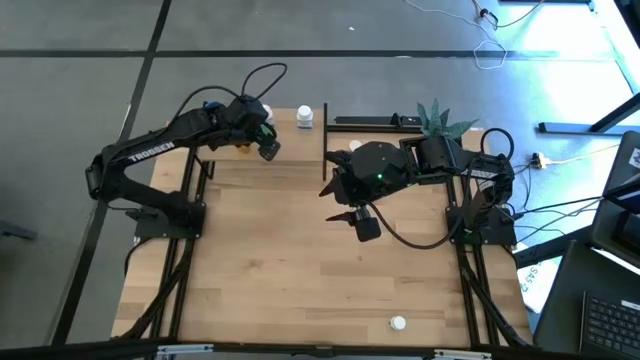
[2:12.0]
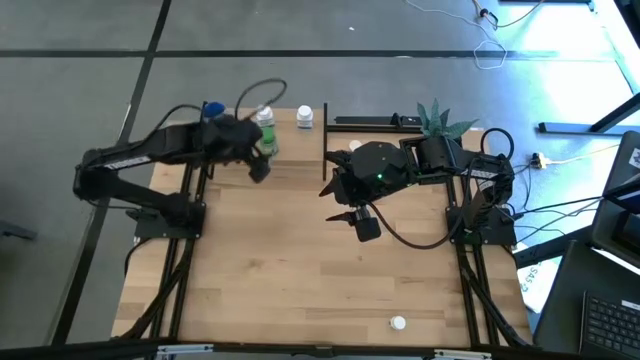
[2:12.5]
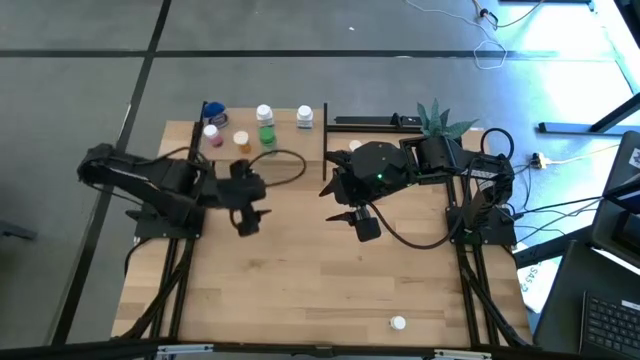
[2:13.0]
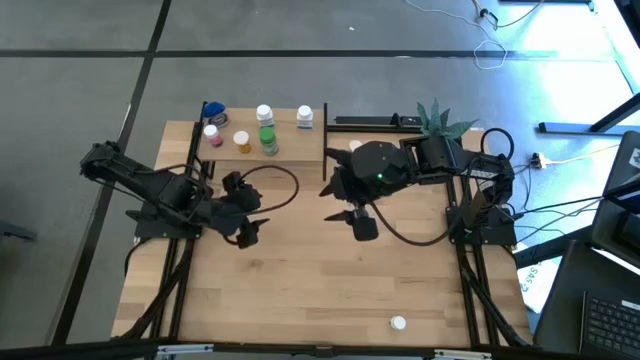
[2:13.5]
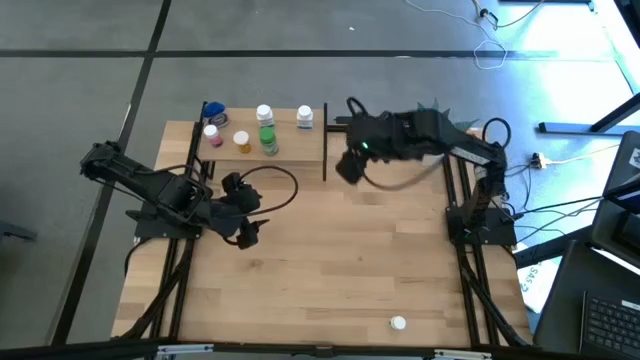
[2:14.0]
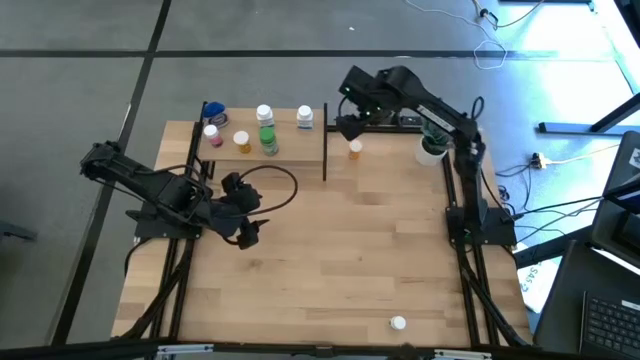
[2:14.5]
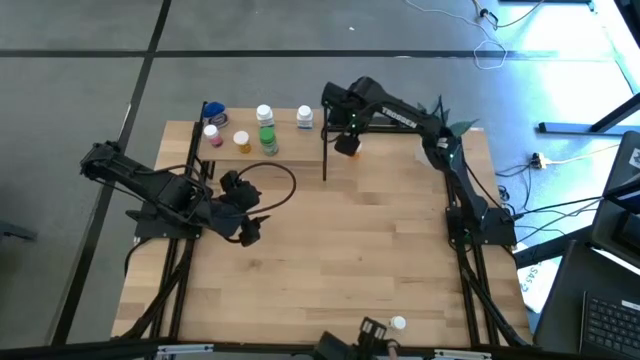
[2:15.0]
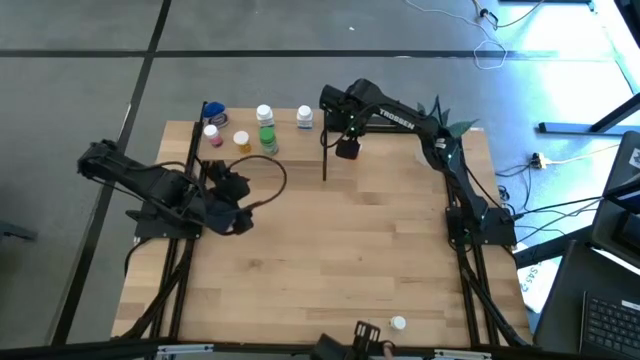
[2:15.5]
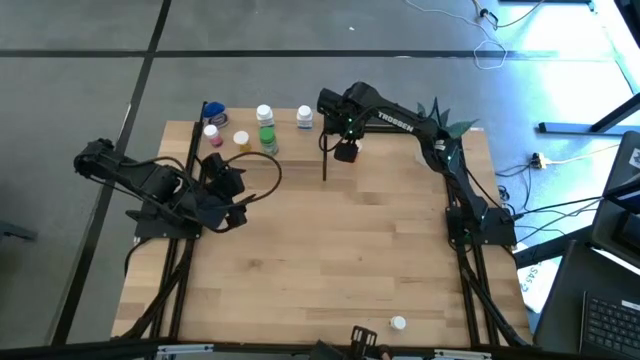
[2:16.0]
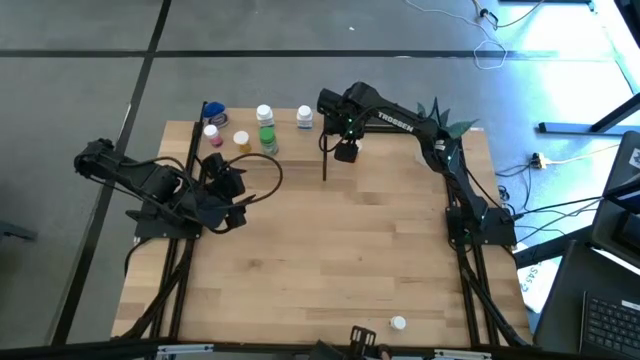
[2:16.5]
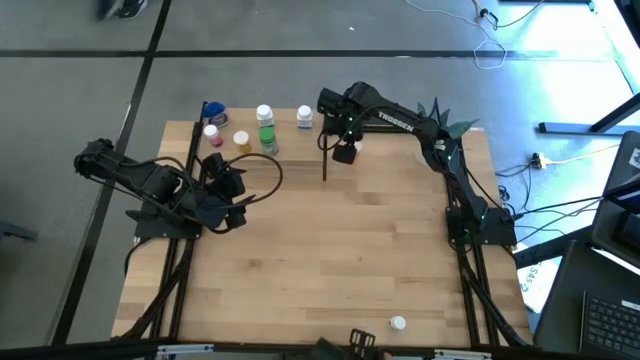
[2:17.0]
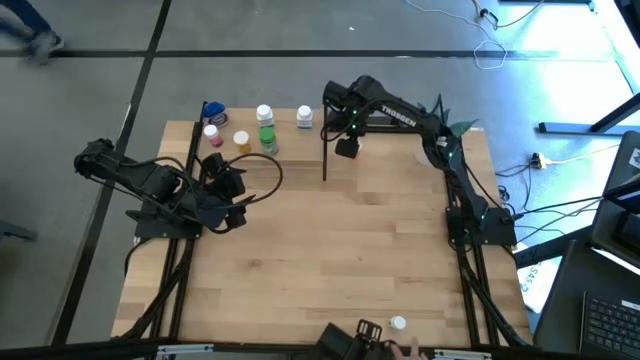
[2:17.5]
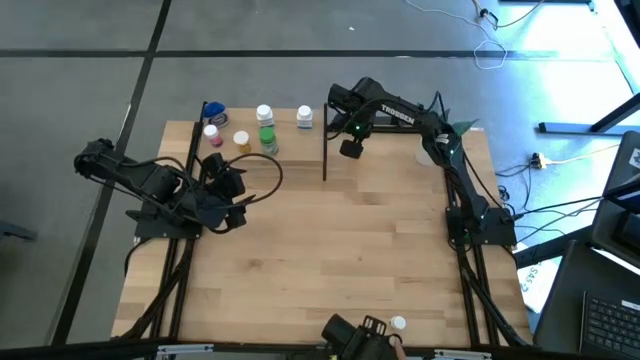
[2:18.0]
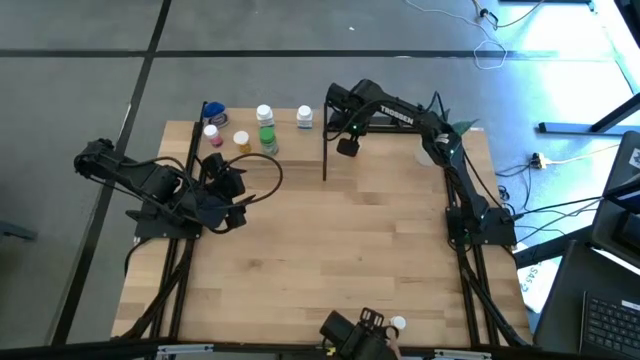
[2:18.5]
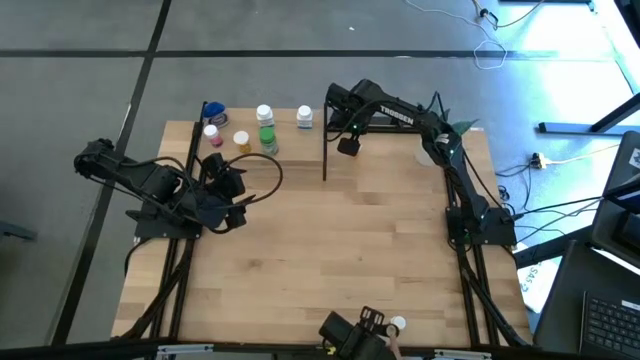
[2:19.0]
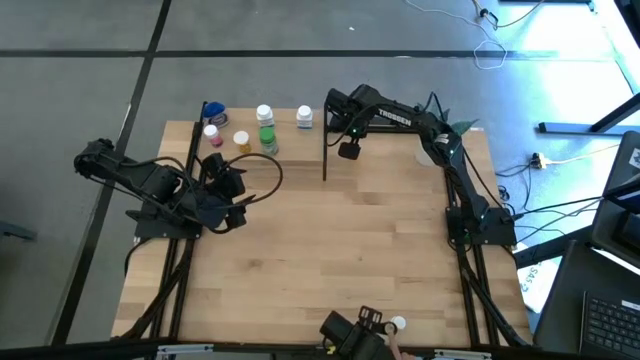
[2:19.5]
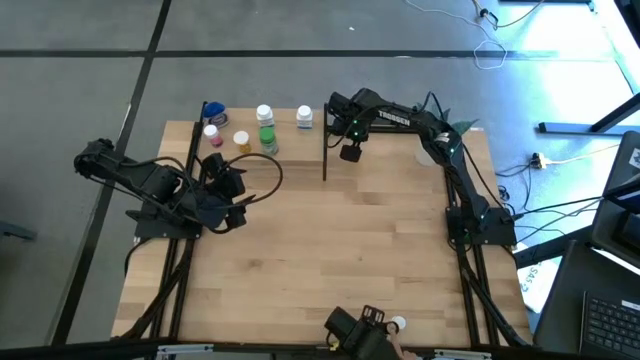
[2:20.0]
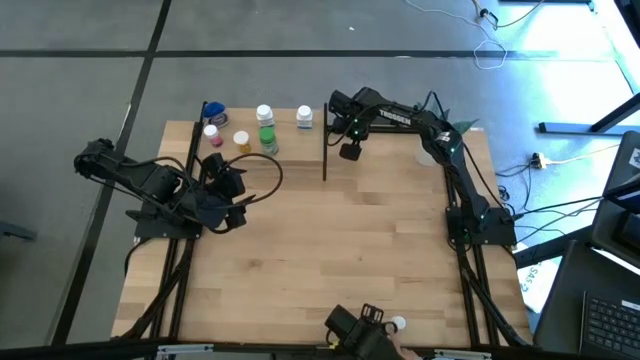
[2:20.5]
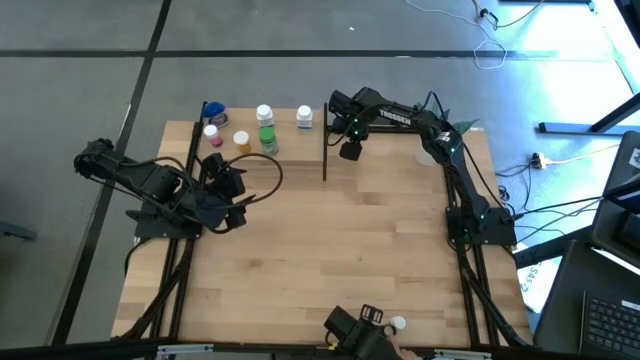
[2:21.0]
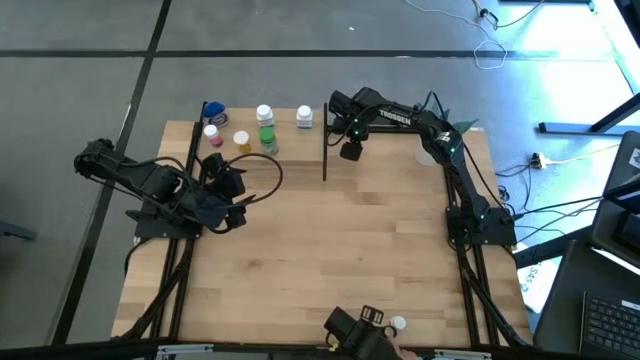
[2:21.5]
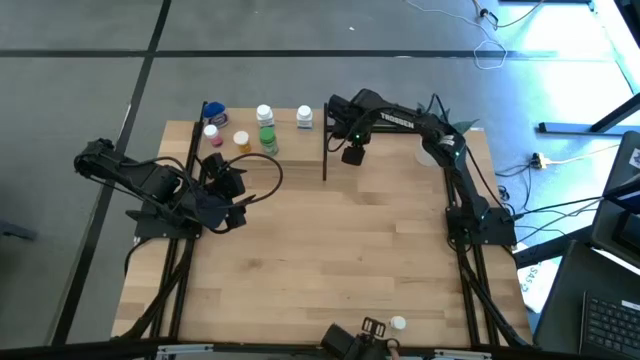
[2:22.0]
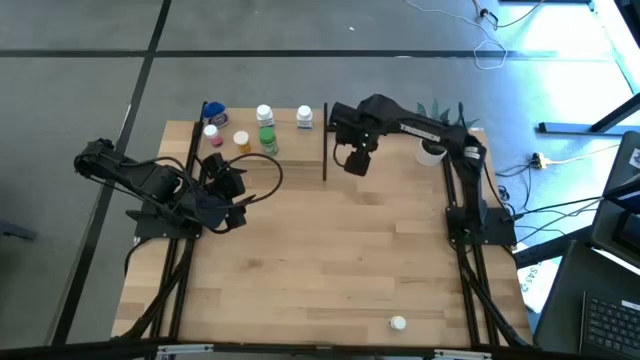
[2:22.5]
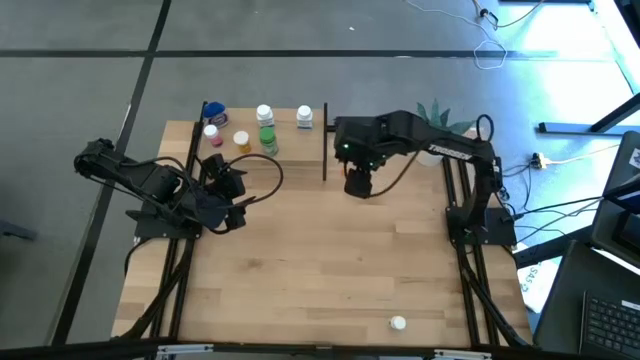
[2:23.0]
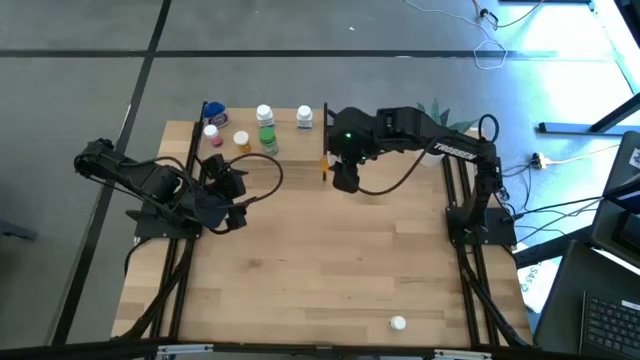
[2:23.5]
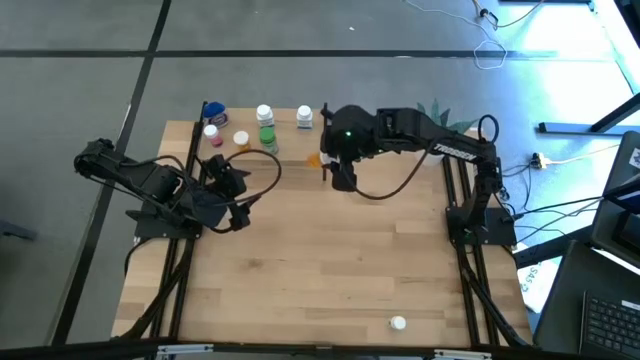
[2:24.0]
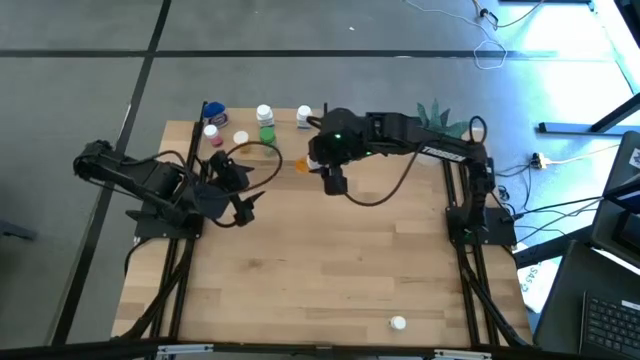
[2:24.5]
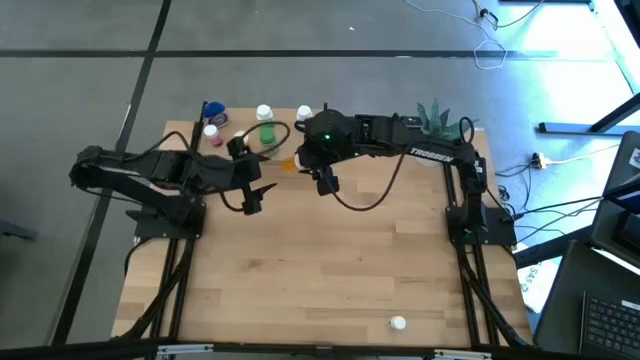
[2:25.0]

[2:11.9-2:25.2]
Task: Pick and place medicine bottles onto shelf by color
Put the orange pill bottle on the shelf

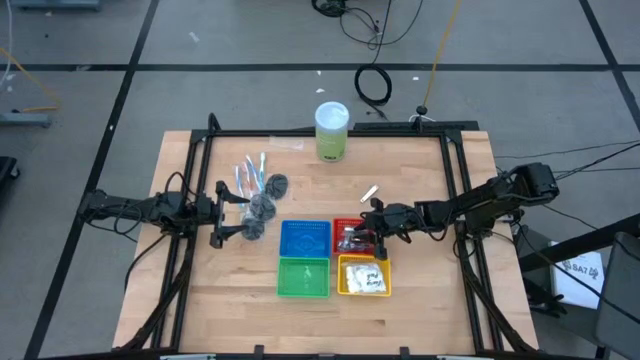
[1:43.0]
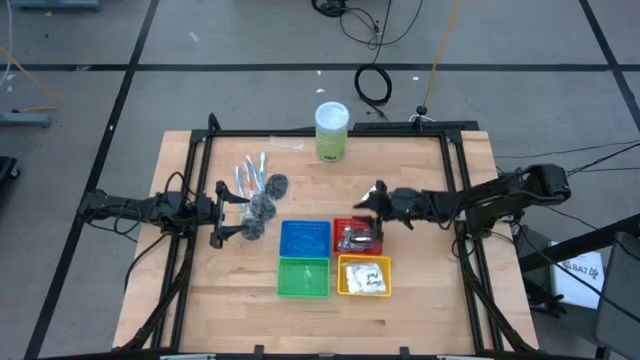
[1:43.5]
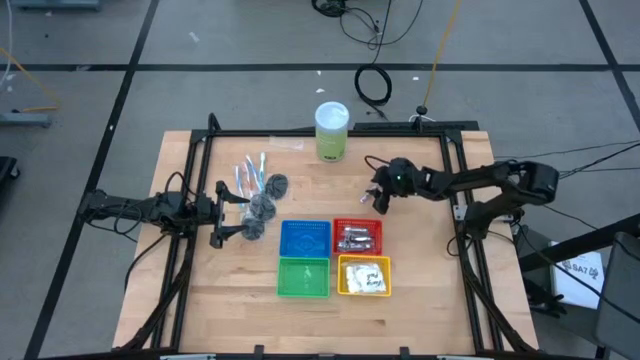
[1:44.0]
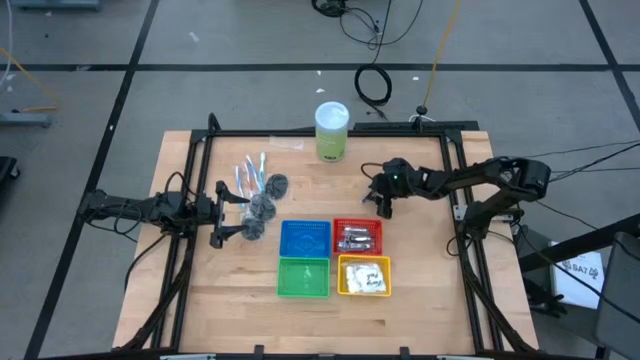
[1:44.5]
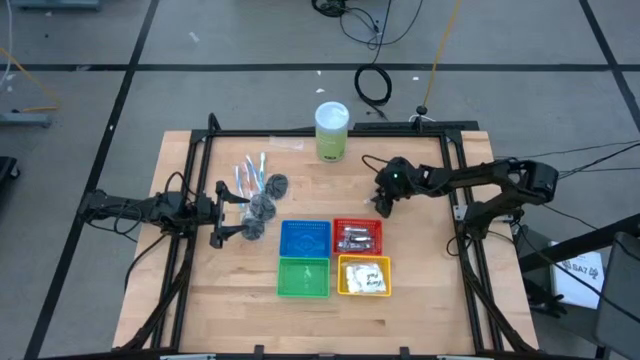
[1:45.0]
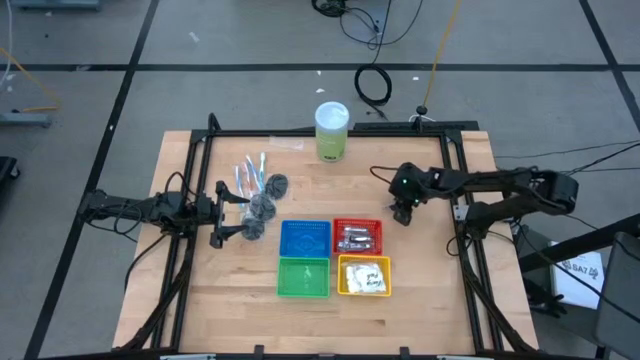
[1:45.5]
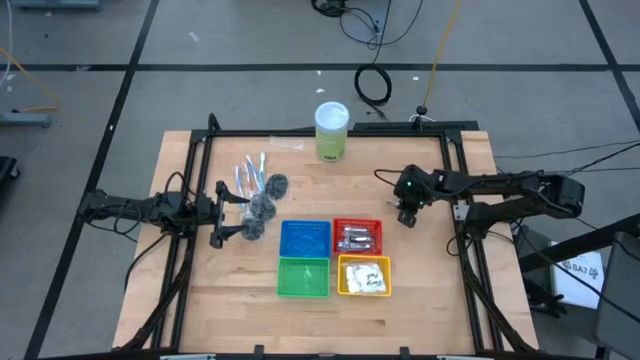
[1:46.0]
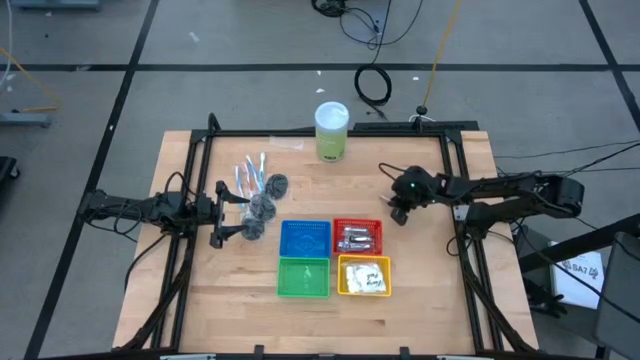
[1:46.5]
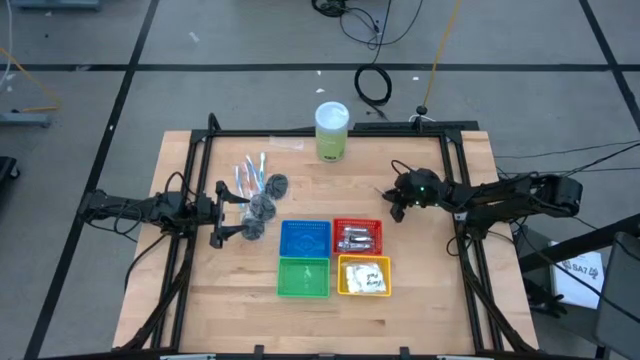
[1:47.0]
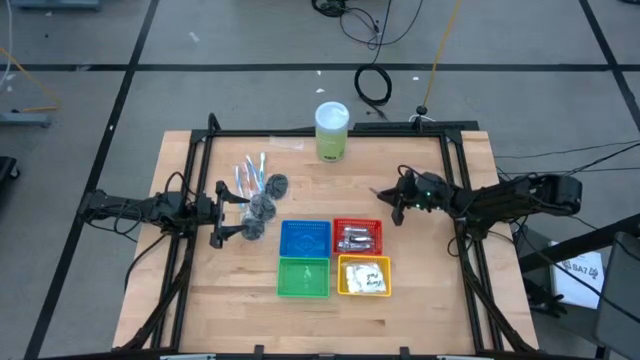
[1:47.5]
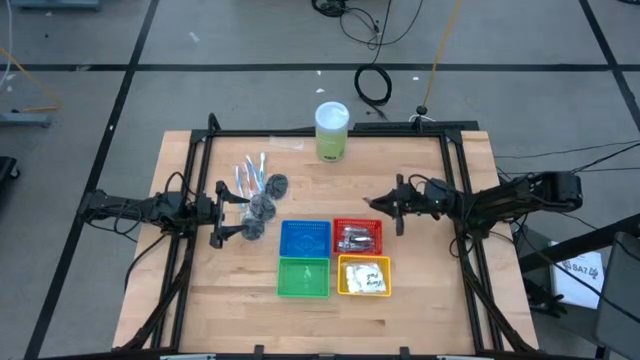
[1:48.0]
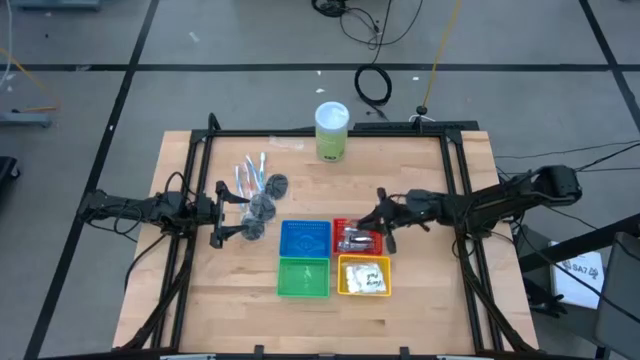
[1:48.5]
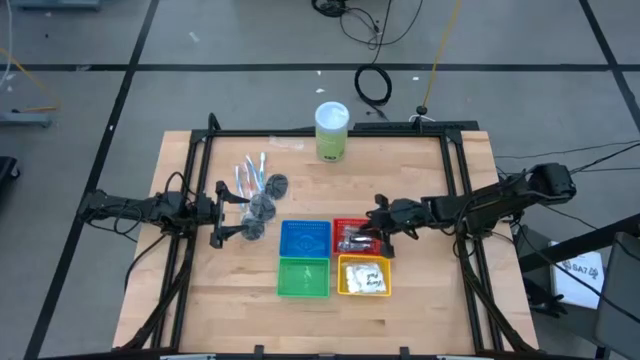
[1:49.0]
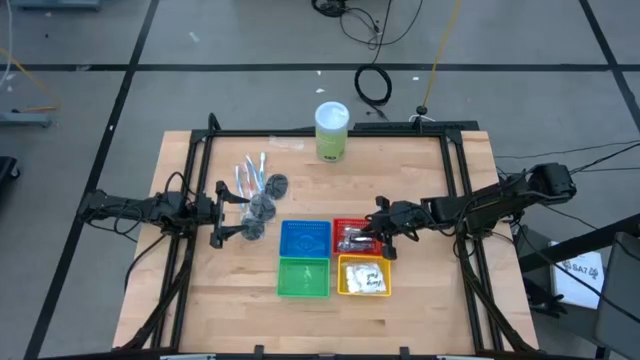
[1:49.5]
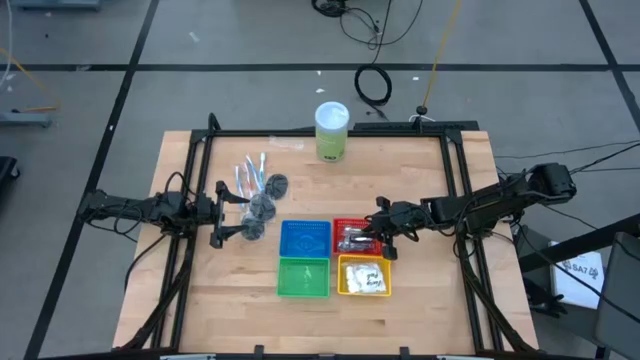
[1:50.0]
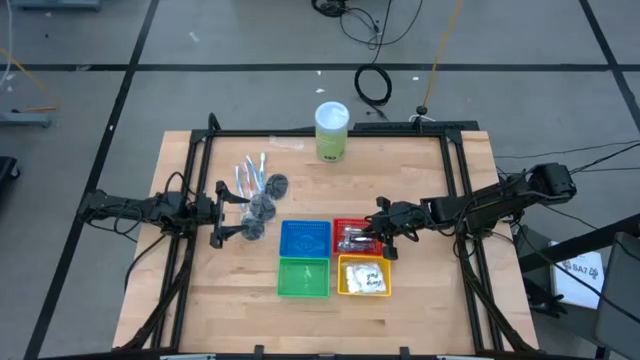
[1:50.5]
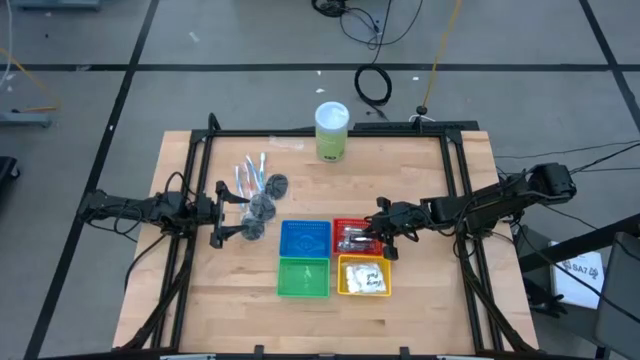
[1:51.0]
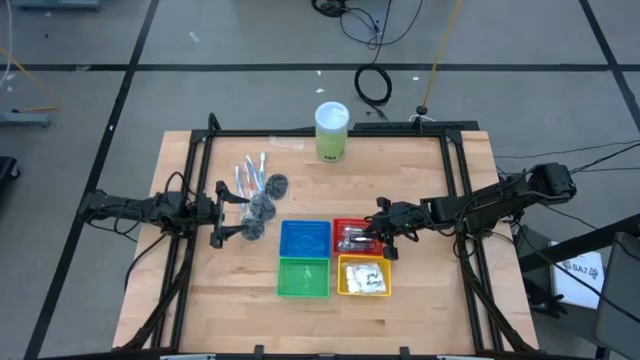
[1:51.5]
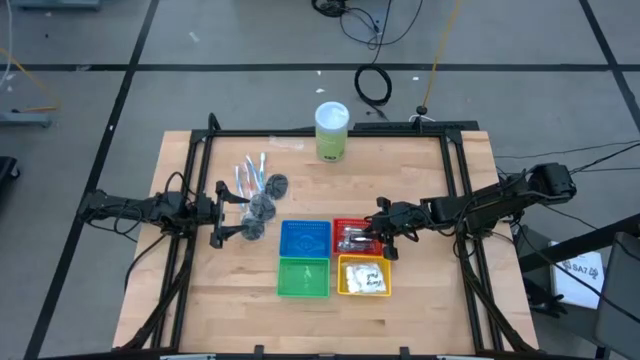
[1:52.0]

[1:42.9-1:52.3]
Task: Pick & Place Travel size toiletries
Put the nail cutter into the red basket
